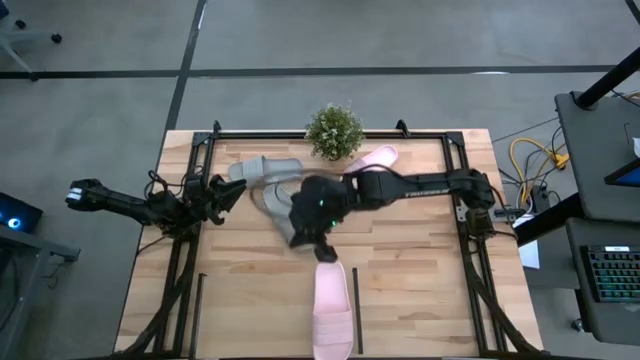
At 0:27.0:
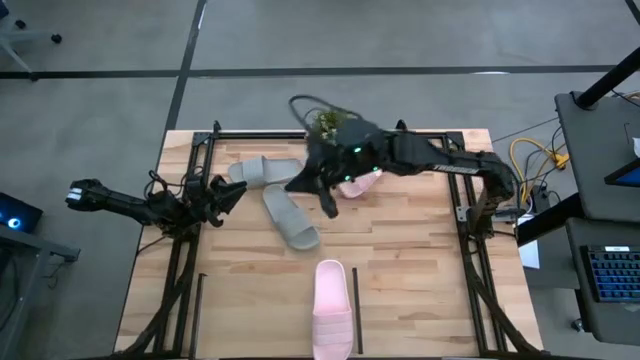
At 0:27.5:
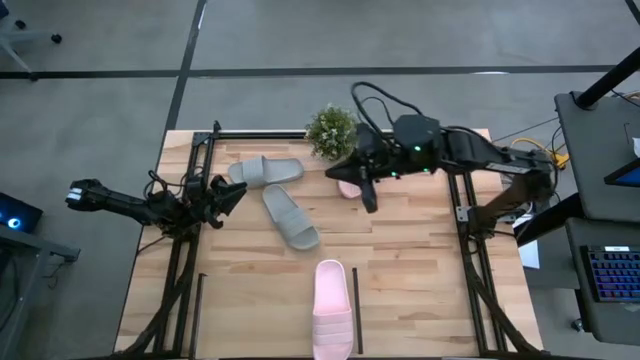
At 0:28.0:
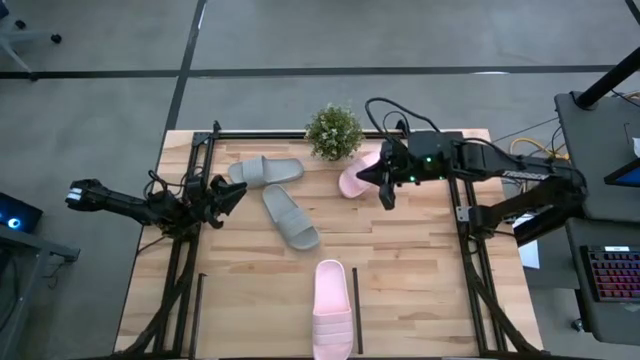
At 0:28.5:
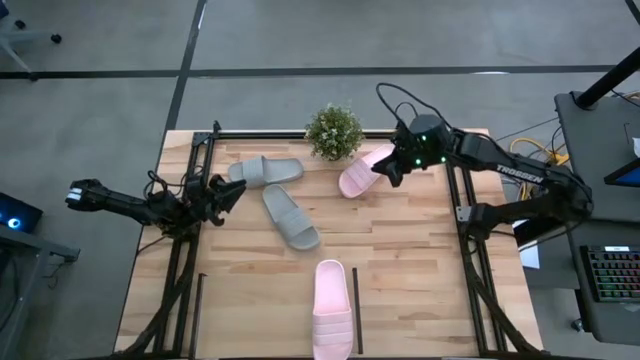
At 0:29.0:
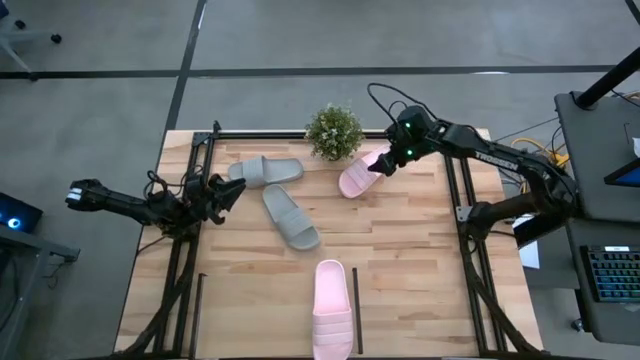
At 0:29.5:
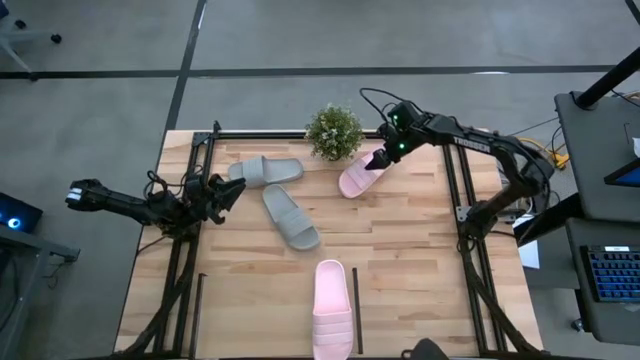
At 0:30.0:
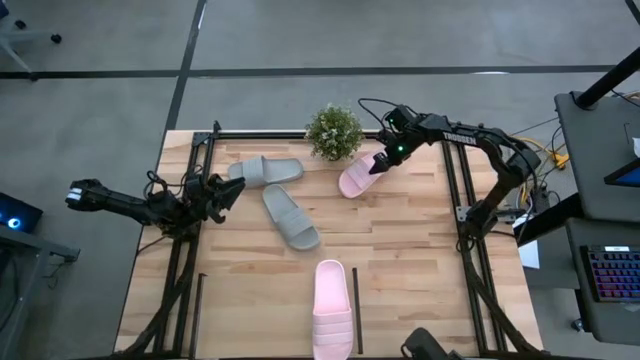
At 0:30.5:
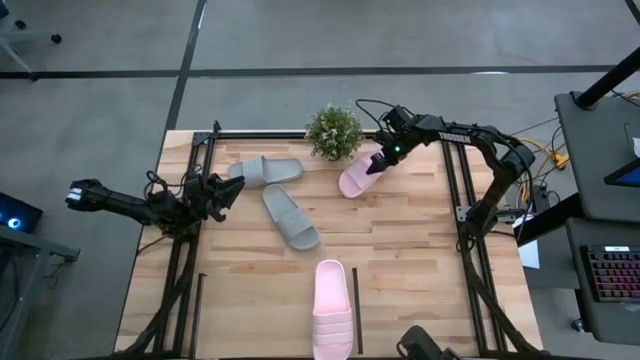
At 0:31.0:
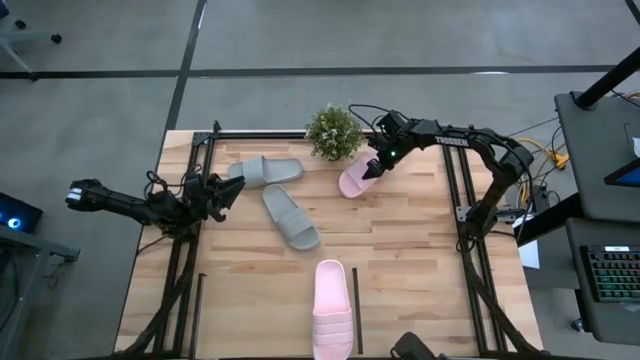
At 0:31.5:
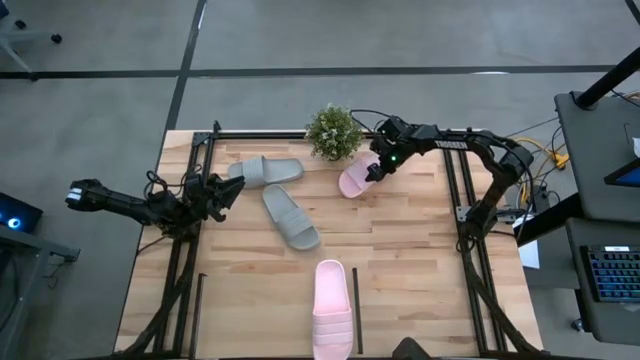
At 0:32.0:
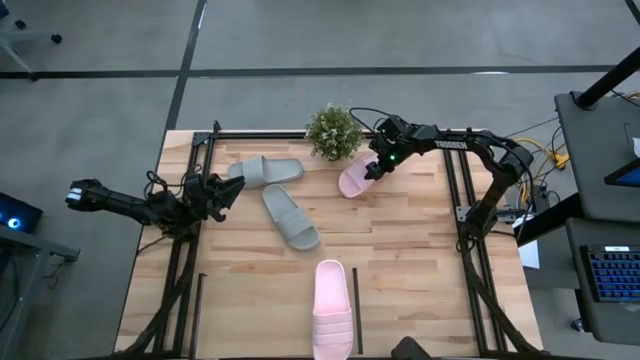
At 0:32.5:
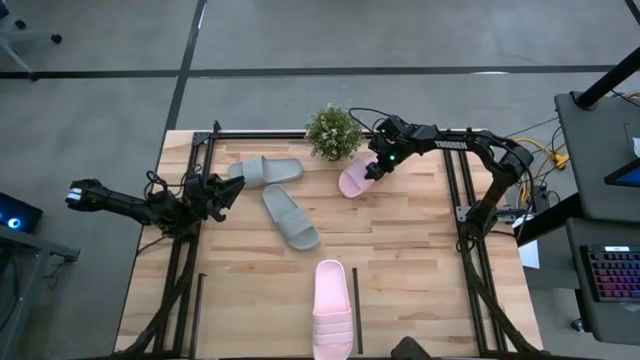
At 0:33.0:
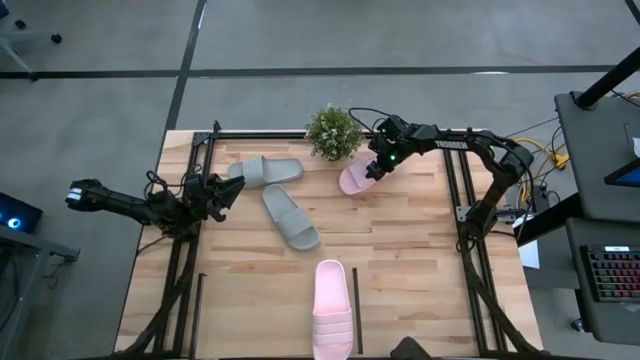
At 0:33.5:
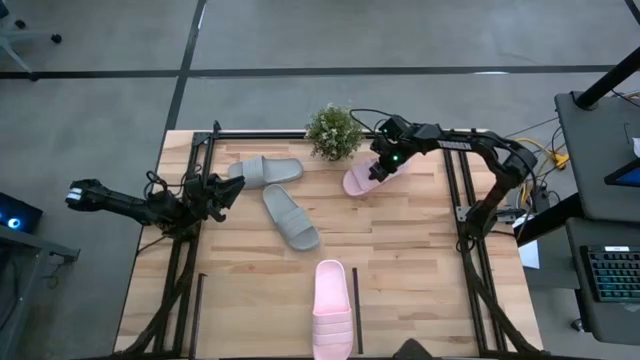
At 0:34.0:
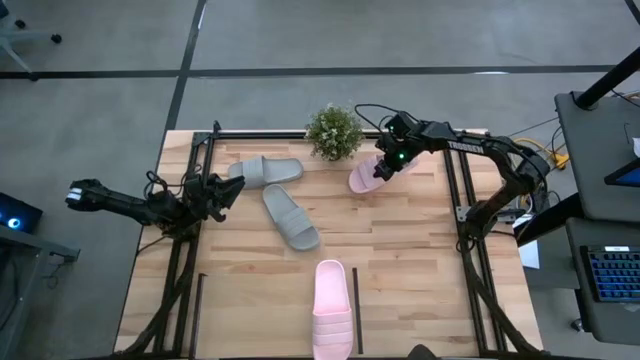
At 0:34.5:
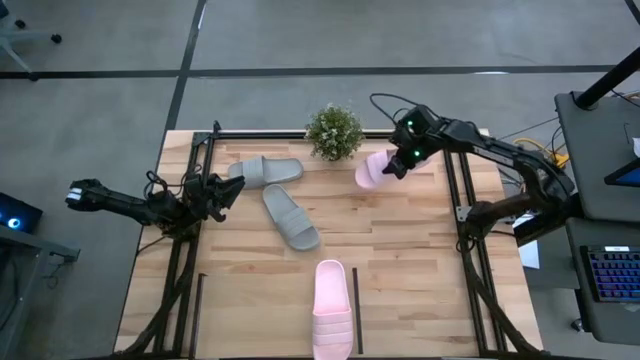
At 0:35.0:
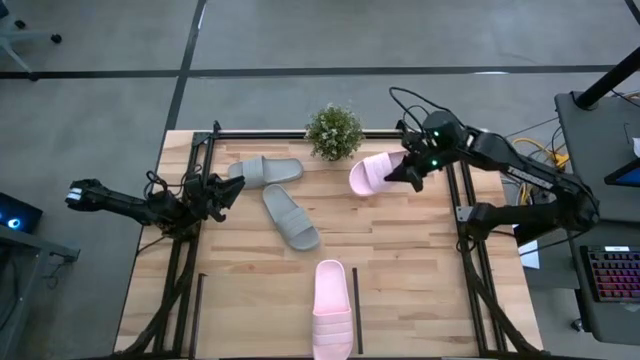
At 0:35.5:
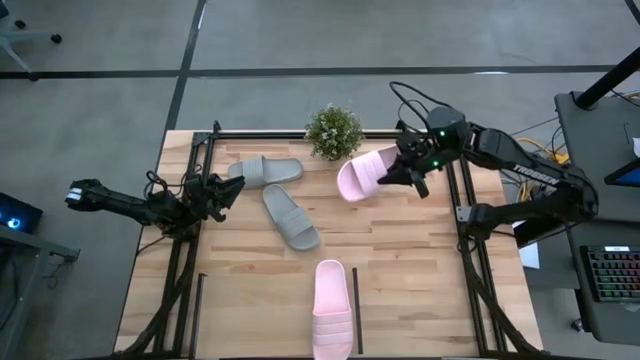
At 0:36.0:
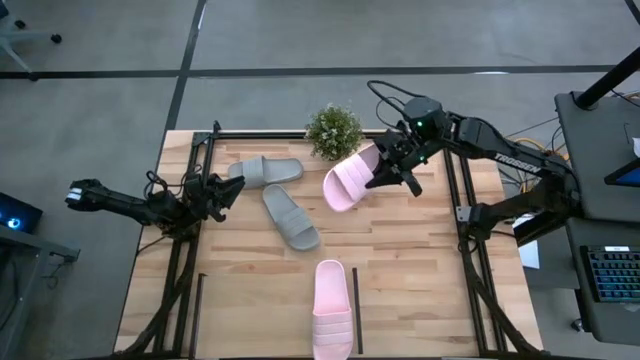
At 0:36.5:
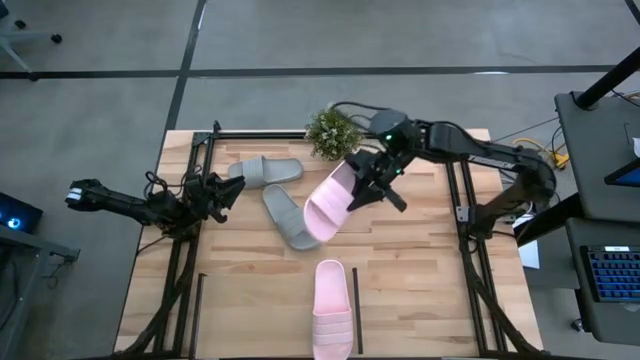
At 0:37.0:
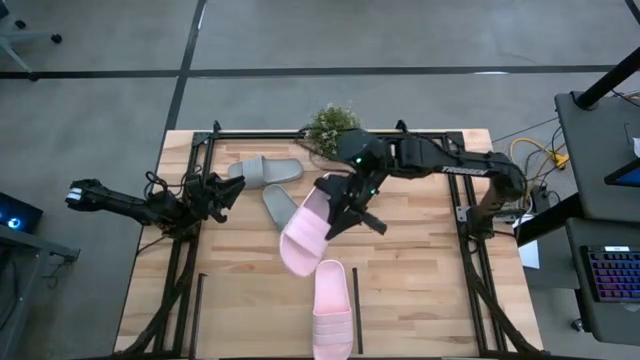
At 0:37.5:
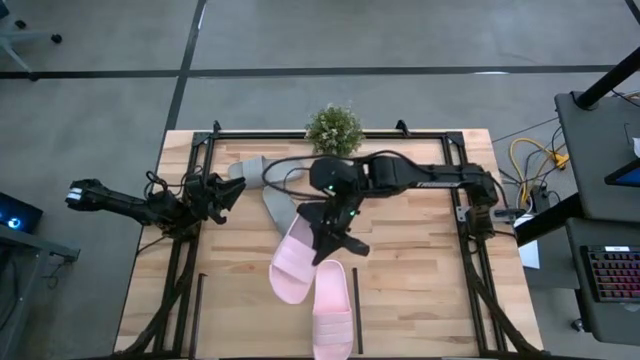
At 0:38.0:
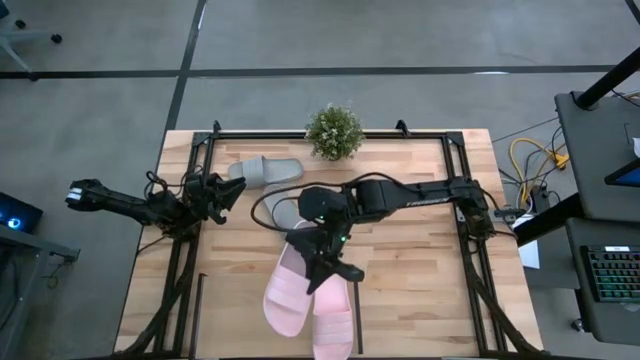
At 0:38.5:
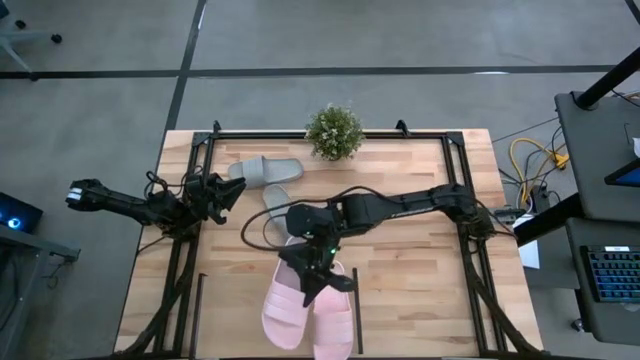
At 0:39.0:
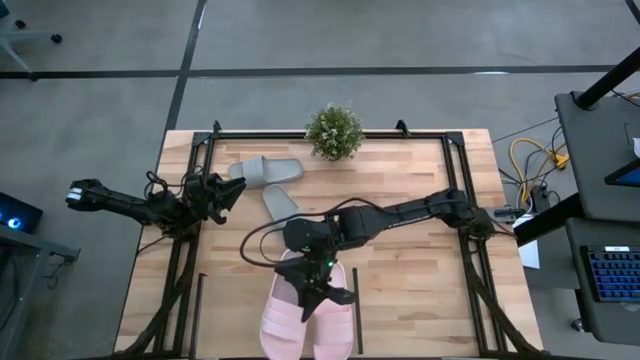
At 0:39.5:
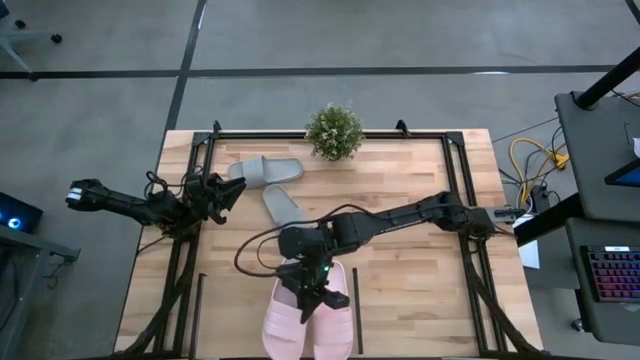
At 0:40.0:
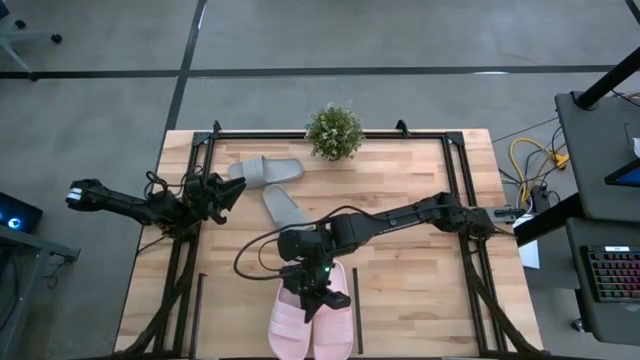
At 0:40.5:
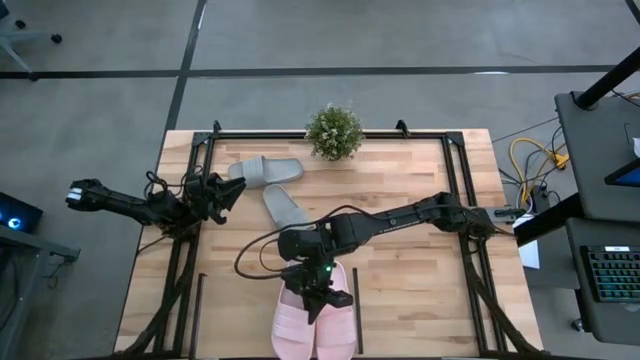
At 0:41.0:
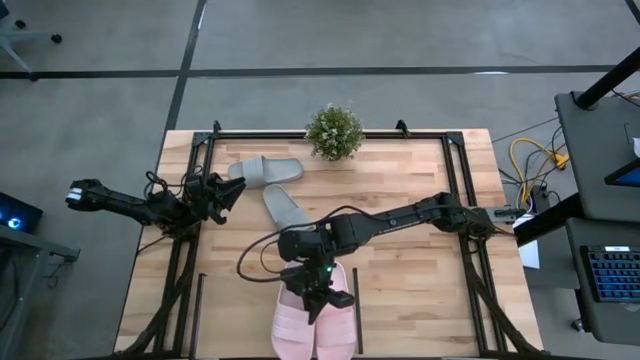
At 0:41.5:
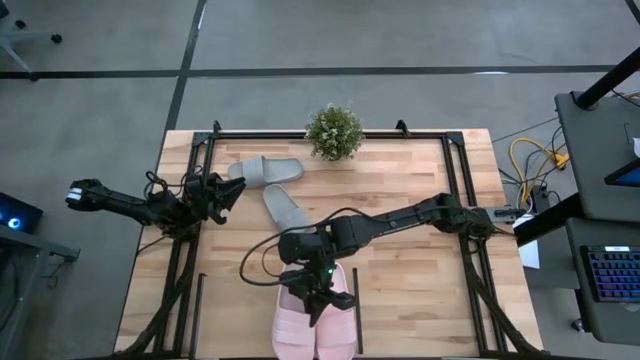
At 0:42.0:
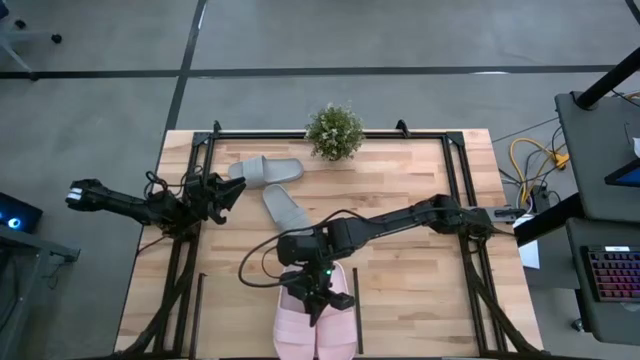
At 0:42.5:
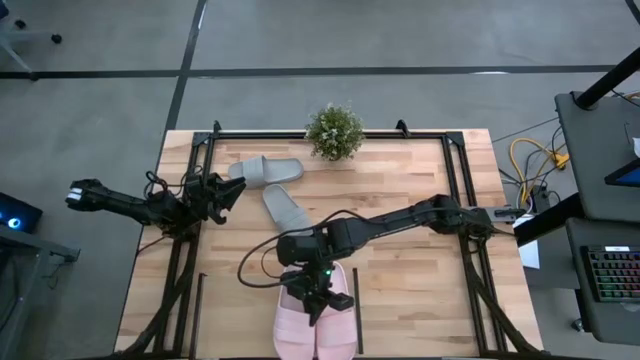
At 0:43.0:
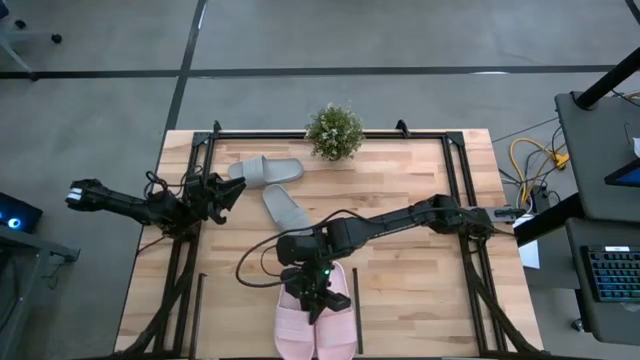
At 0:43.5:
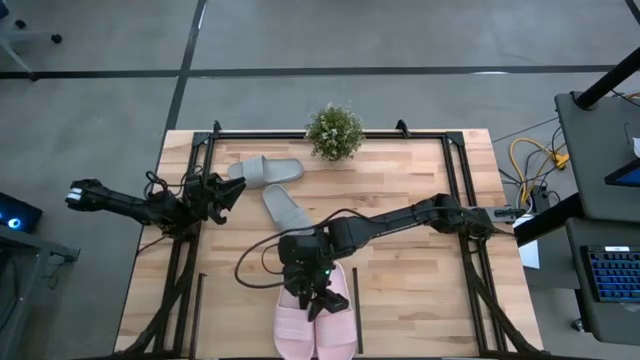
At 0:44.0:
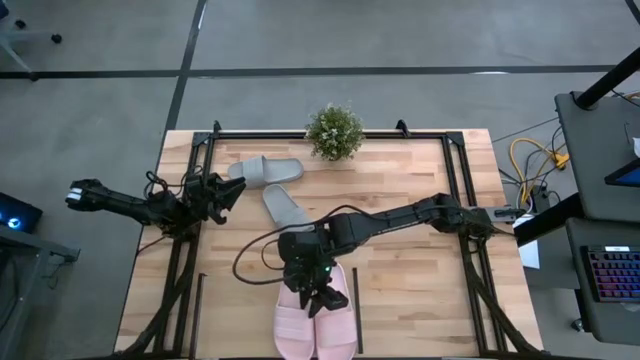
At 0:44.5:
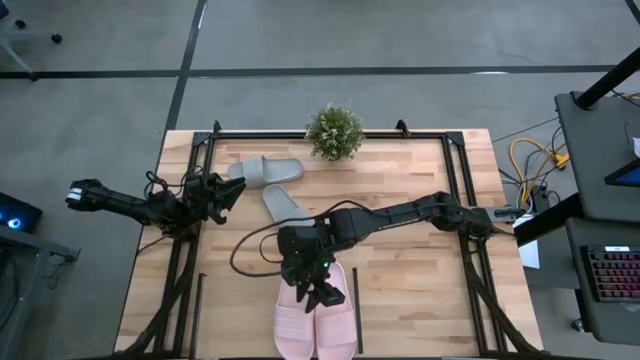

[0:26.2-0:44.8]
Task: Pick and place slides into the shelf
Put the pink slipper on the shelf
